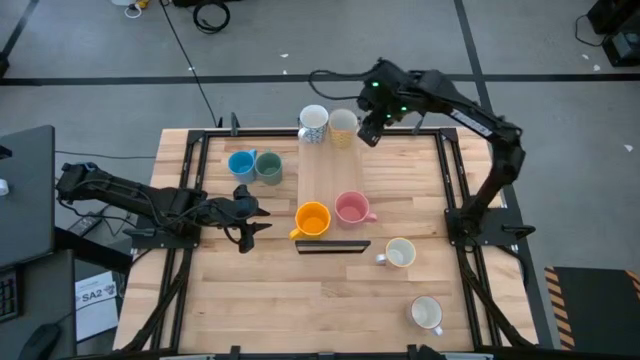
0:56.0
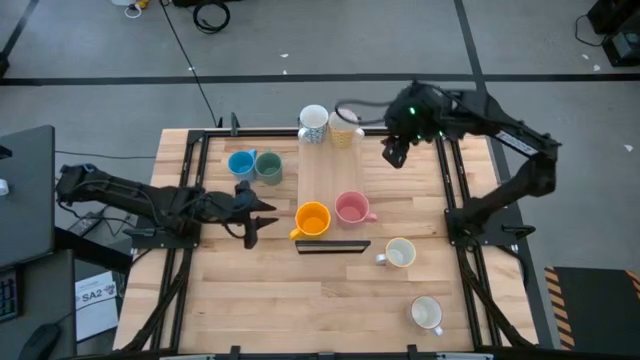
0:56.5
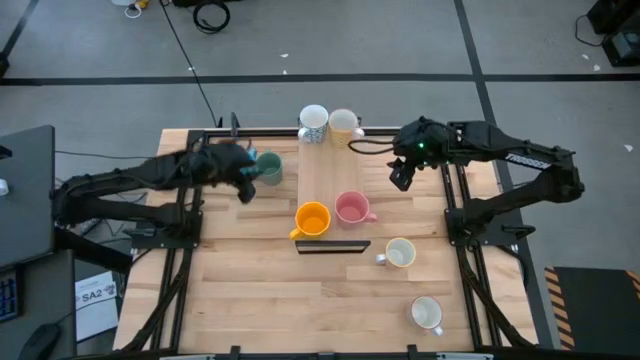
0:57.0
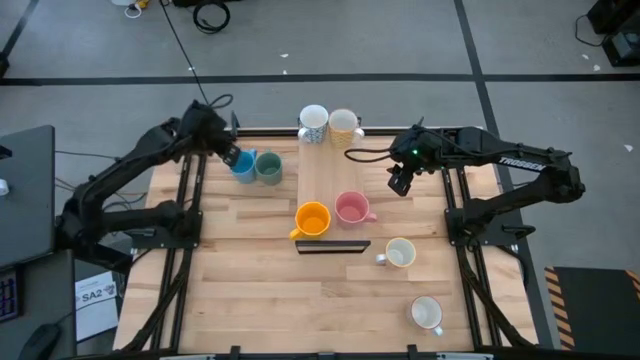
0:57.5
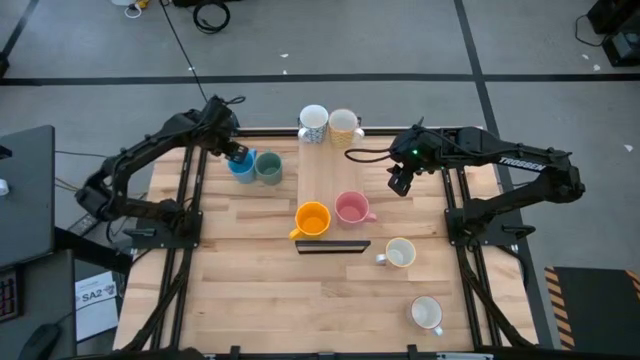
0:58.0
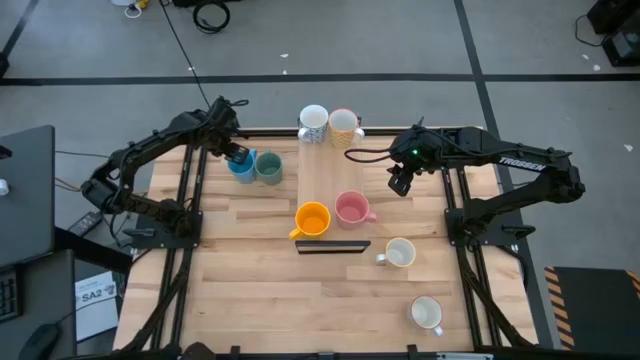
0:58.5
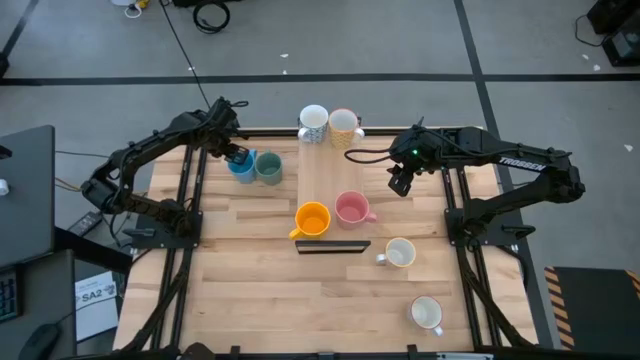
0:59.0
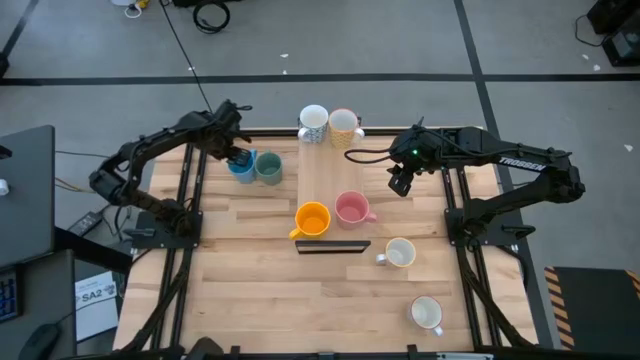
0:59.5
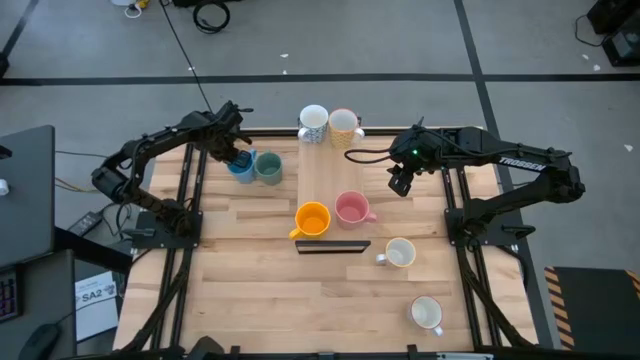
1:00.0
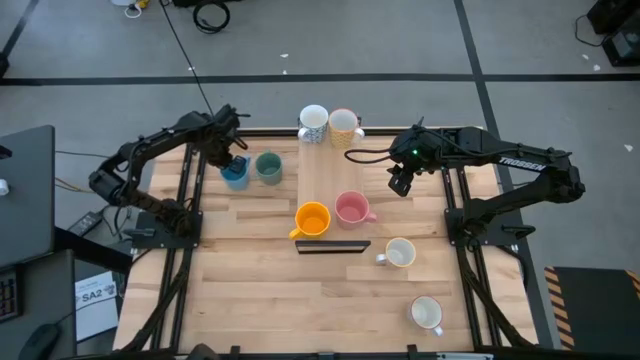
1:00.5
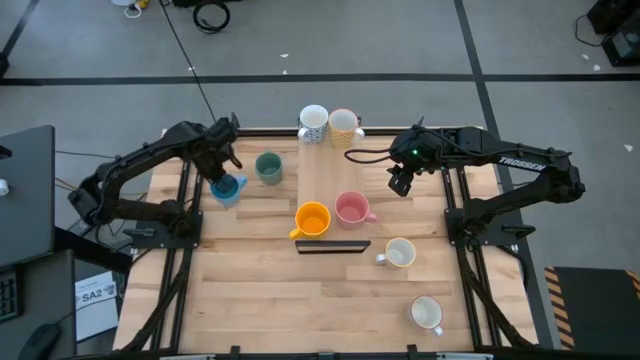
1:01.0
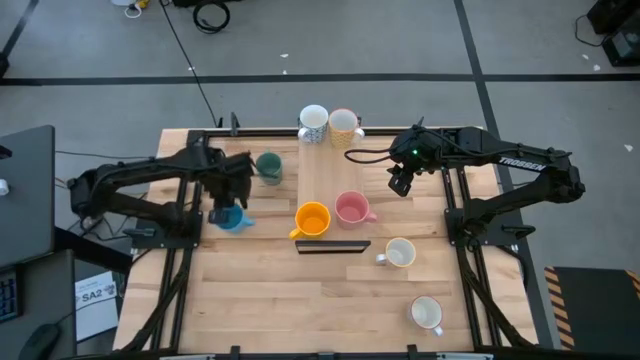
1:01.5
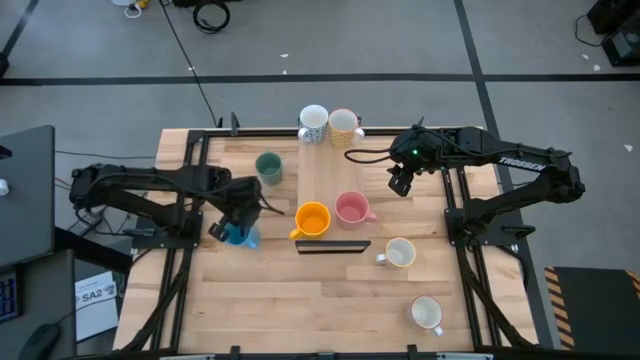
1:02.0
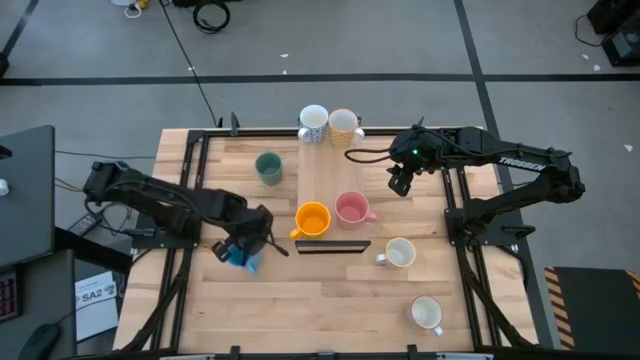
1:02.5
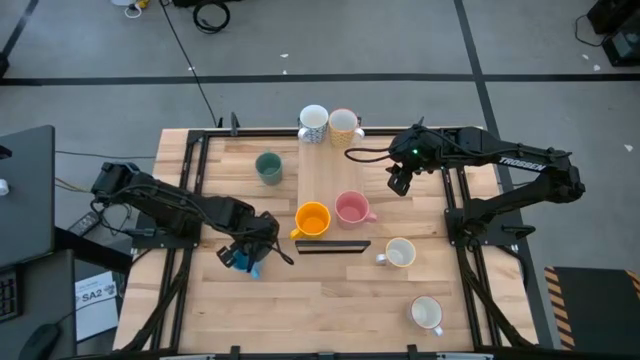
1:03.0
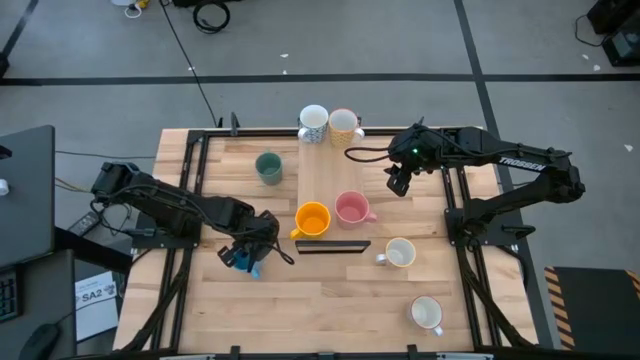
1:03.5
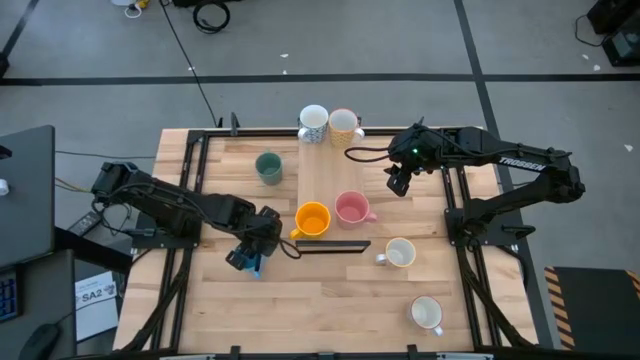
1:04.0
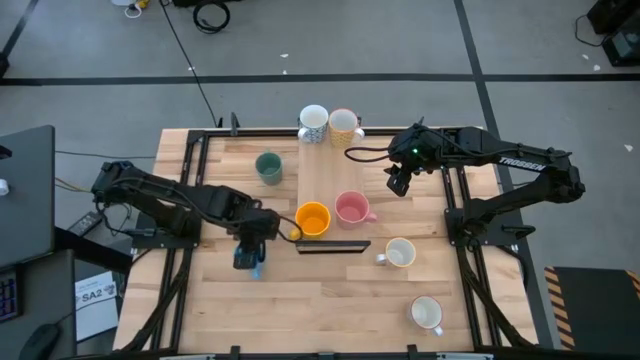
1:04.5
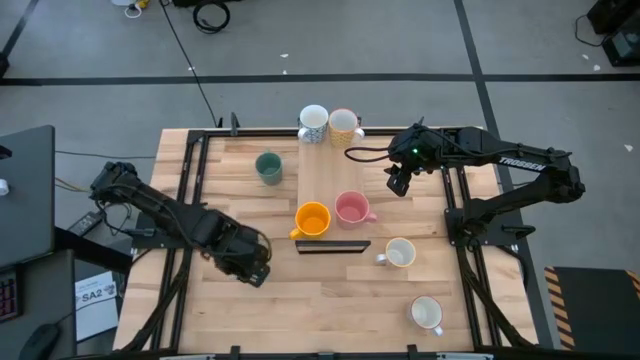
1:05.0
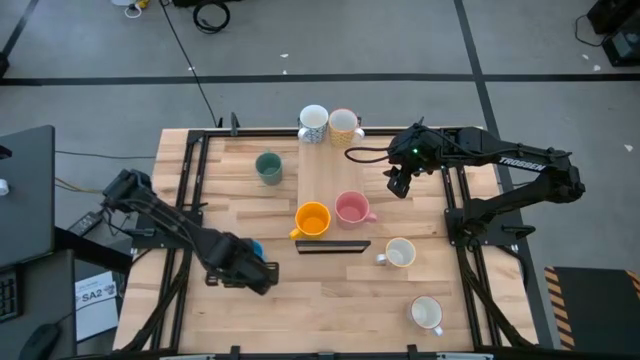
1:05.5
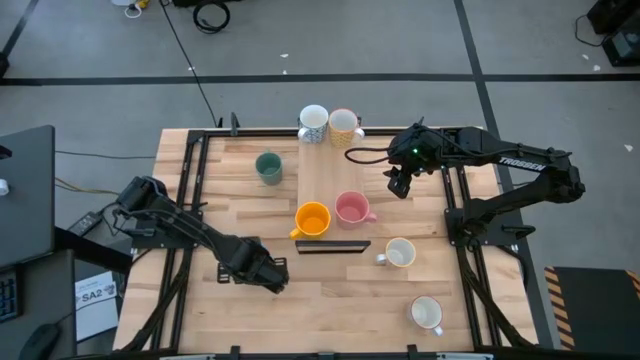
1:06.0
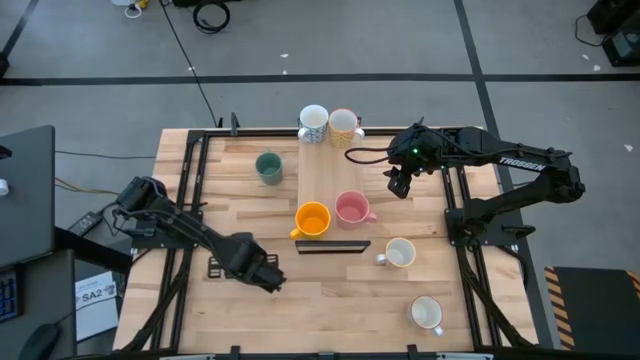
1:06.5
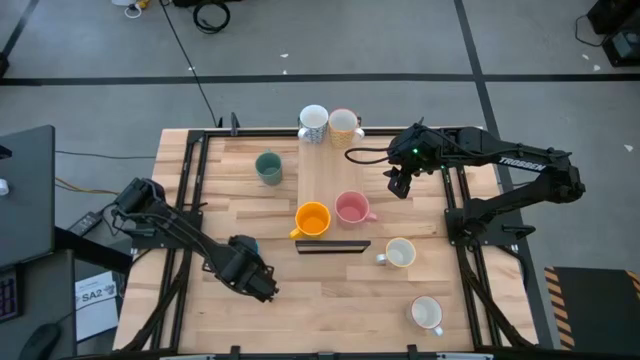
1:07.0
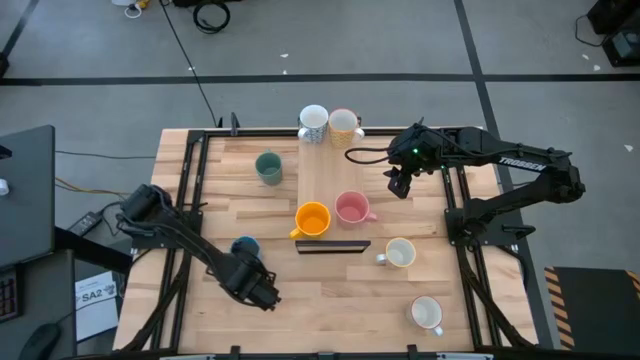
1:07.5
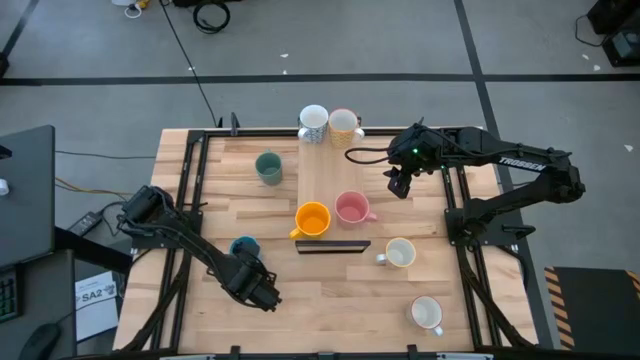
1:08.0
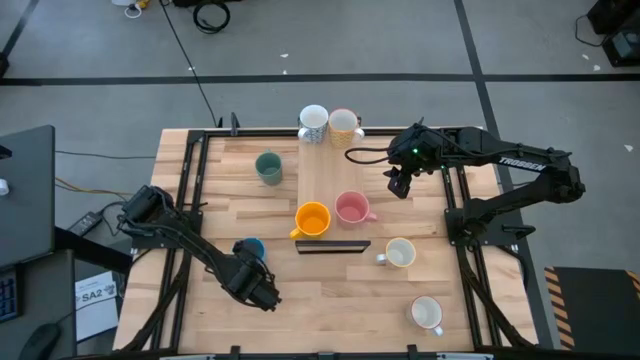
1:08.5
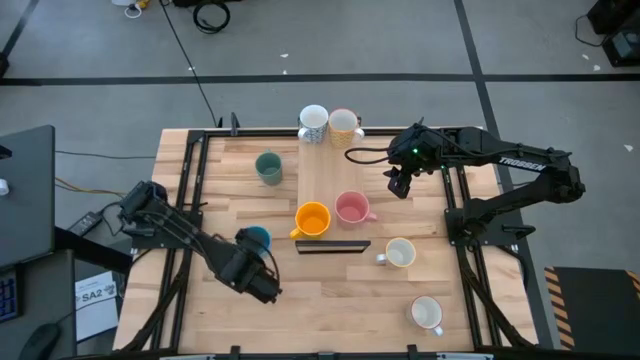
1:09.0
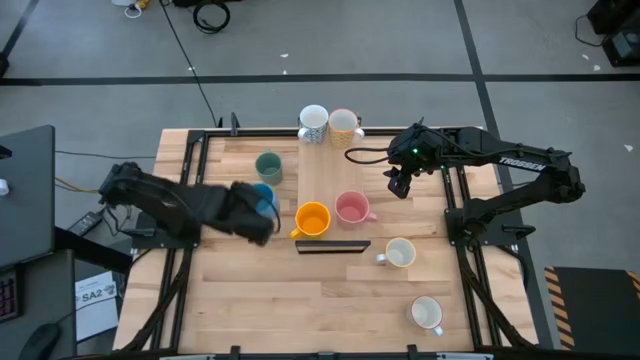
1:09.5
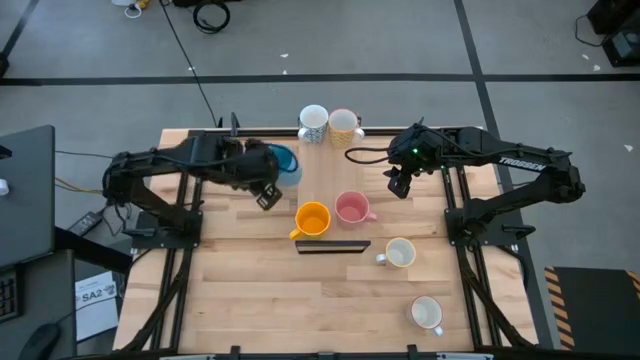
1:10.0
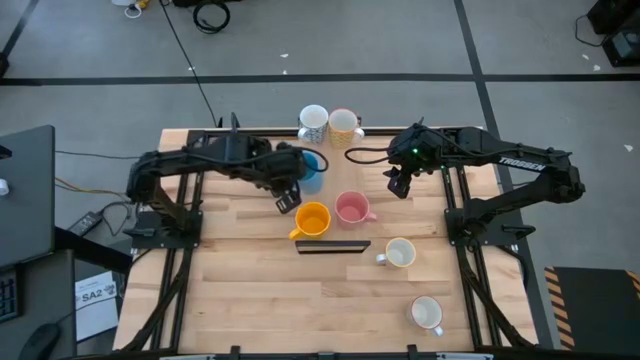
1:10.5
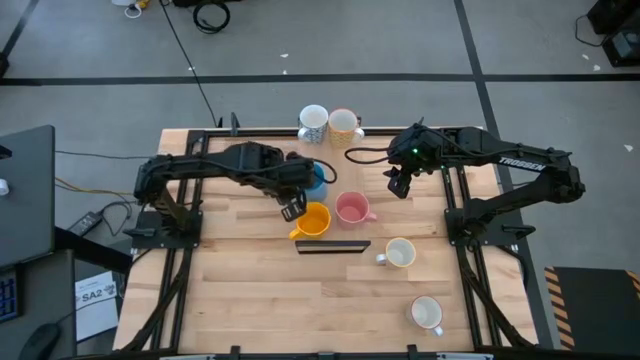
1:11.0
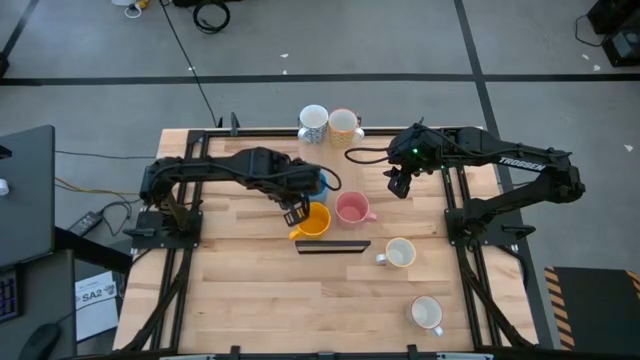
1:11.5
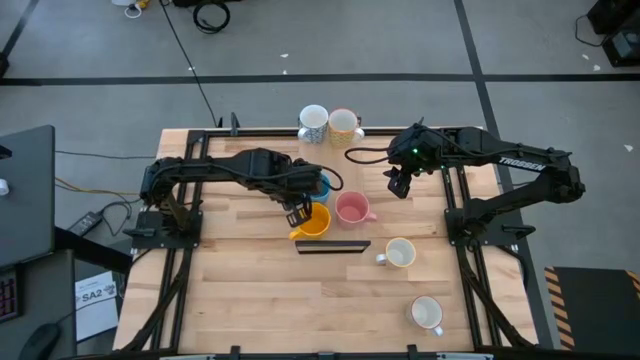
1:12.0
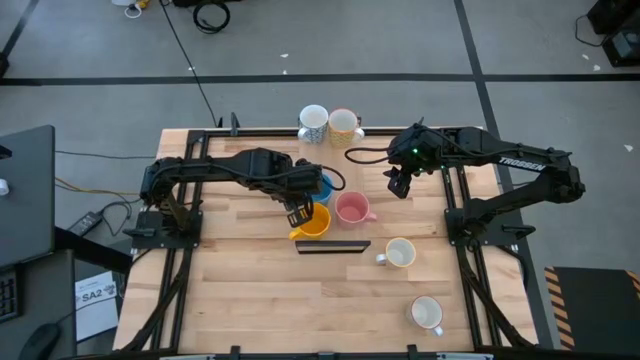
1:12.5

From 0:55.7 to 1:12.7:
Task: Place coffee mugs
Put the blue mug on the shelf

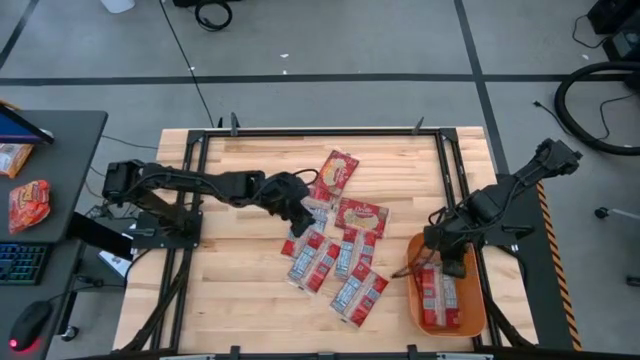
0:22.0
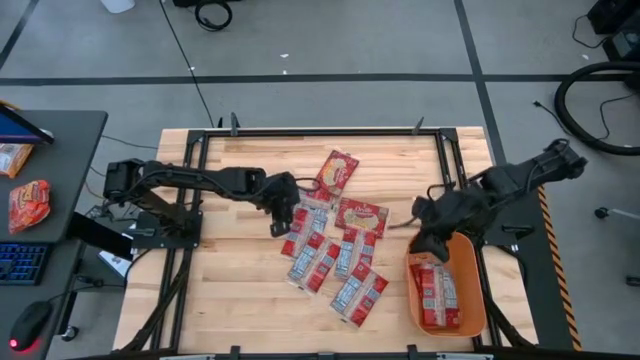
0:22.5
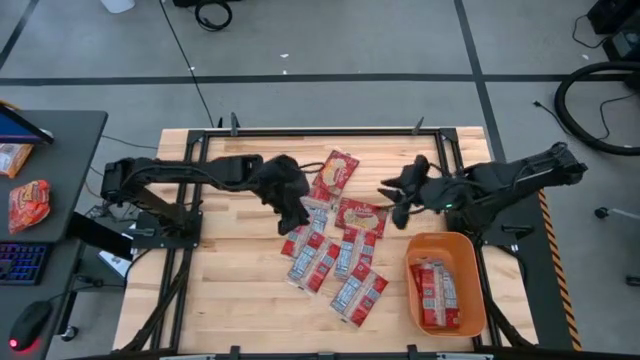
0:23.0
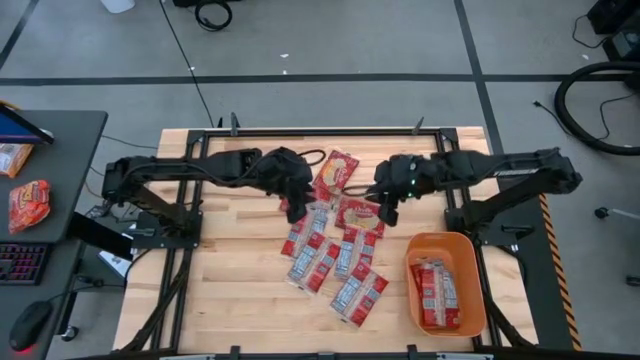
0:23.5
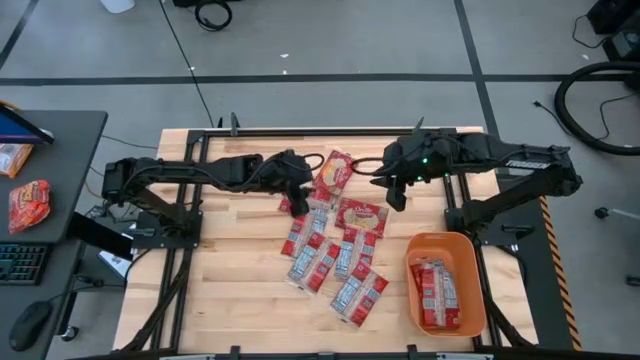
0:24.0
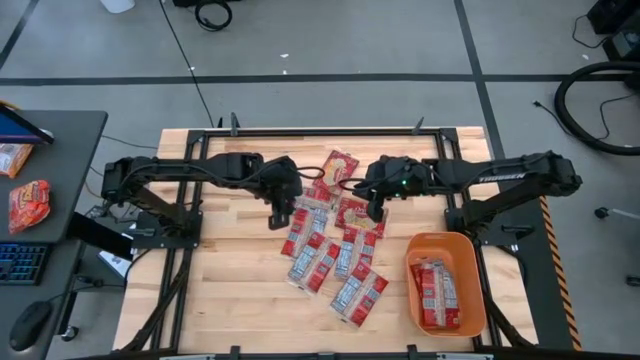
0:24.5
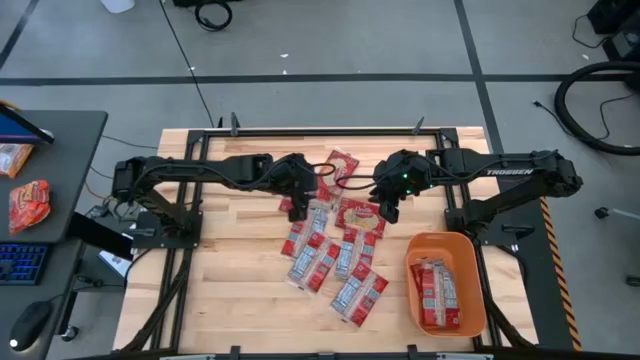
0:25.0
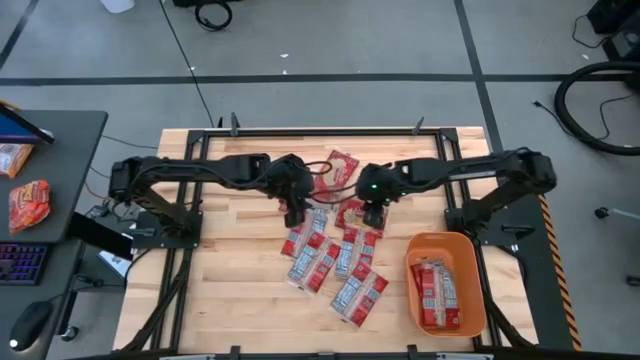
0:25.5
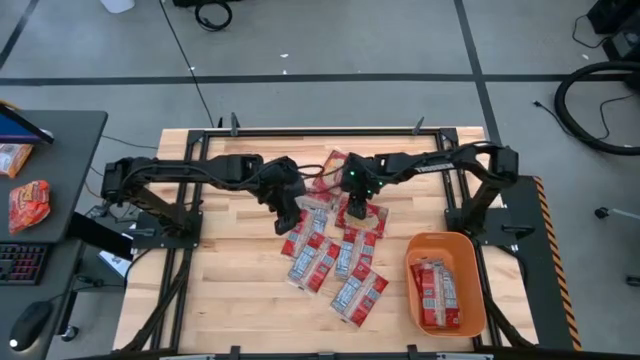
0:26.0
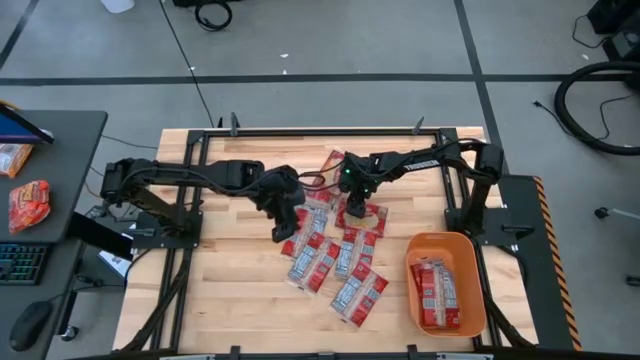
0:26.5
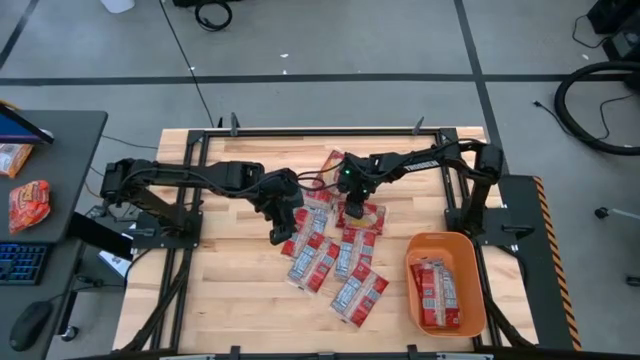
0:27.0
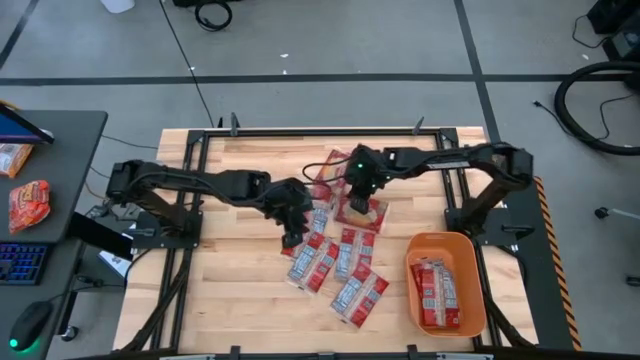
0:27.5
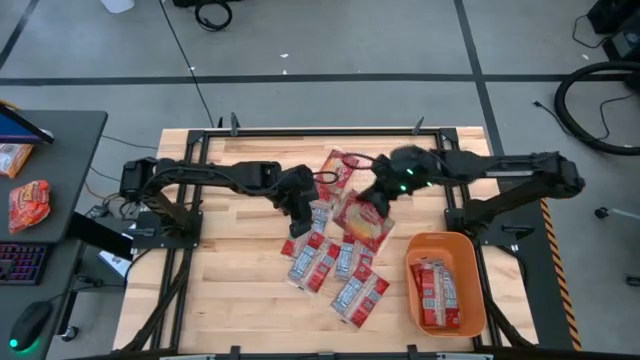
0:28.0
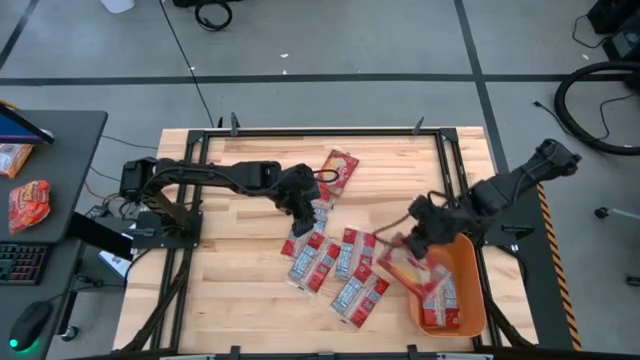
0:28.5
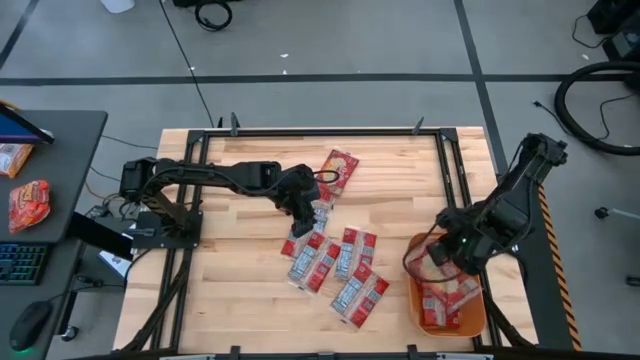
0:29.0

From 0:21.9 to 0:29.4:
Task: Sort popcorn bags into baskets
Put the red popcorn bag into the orange bin
